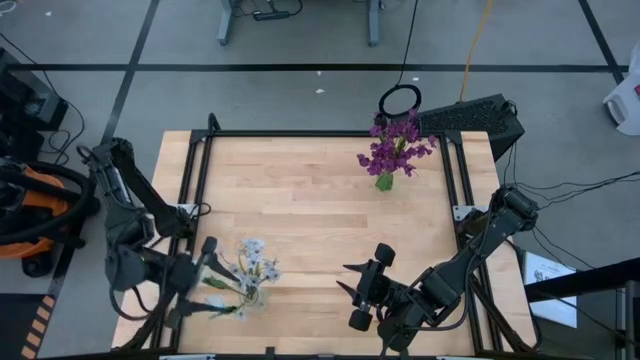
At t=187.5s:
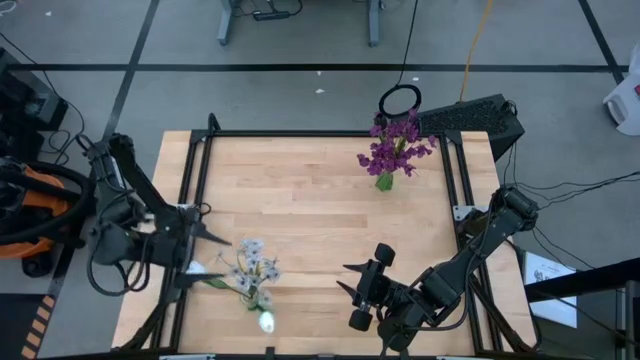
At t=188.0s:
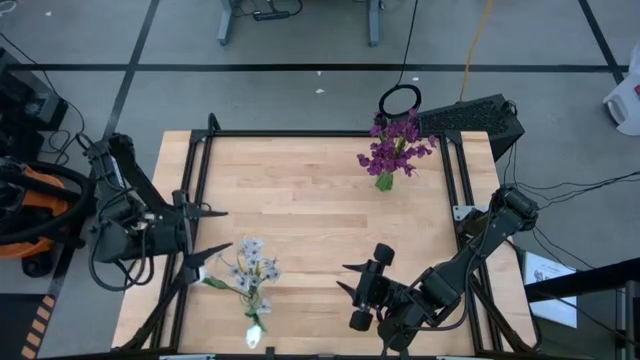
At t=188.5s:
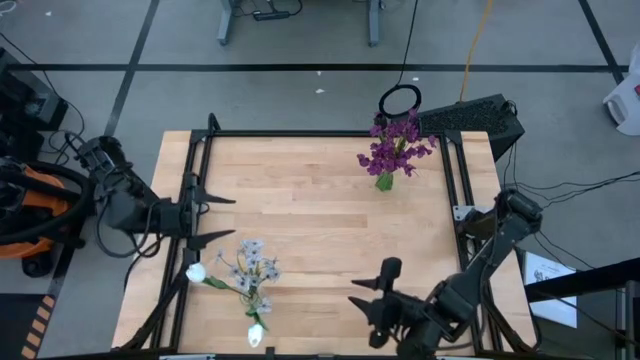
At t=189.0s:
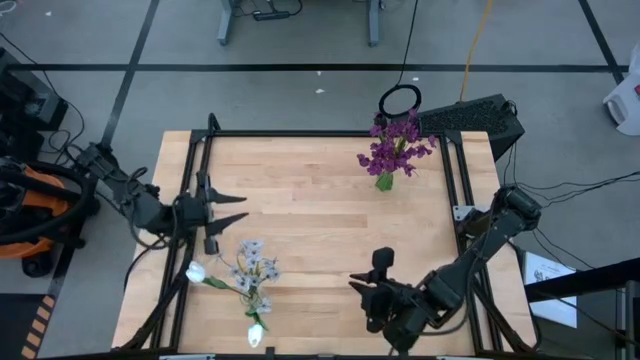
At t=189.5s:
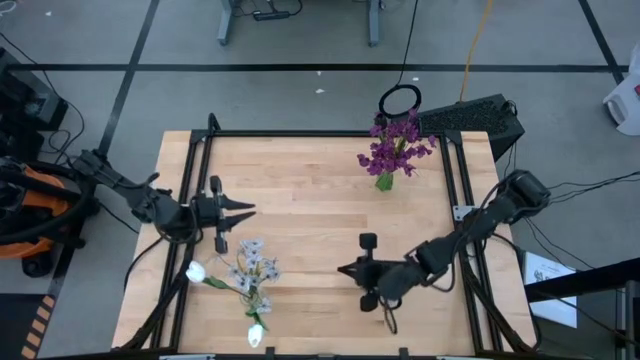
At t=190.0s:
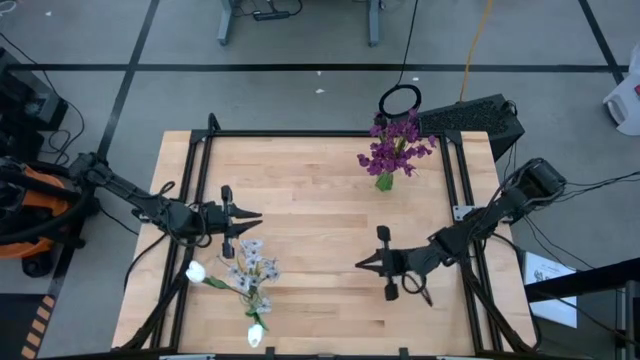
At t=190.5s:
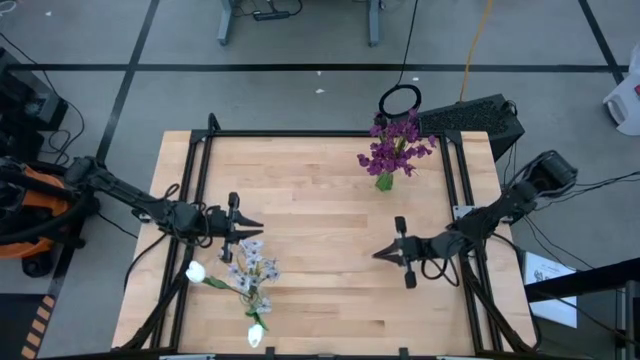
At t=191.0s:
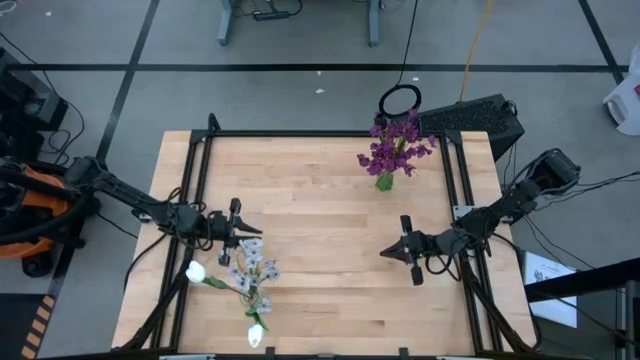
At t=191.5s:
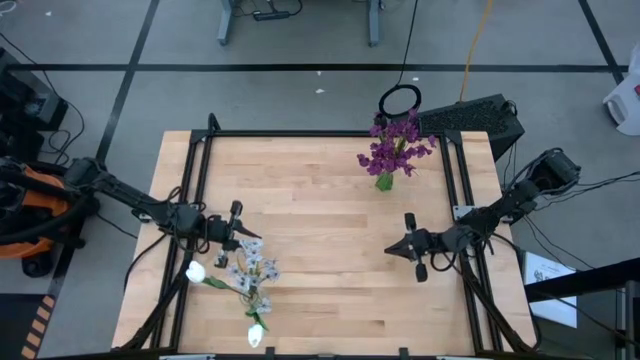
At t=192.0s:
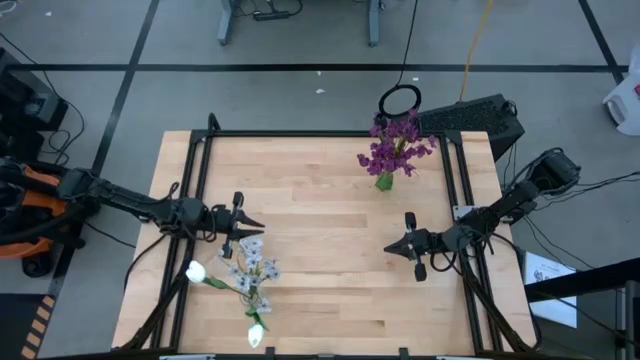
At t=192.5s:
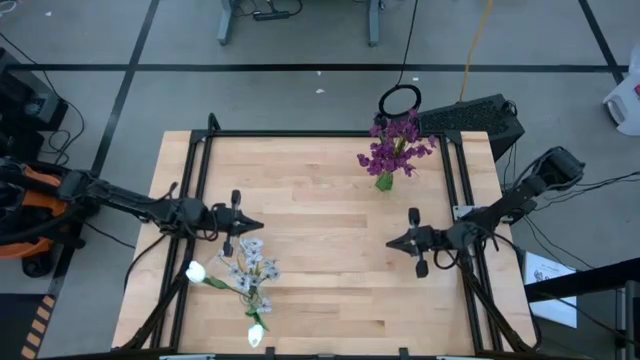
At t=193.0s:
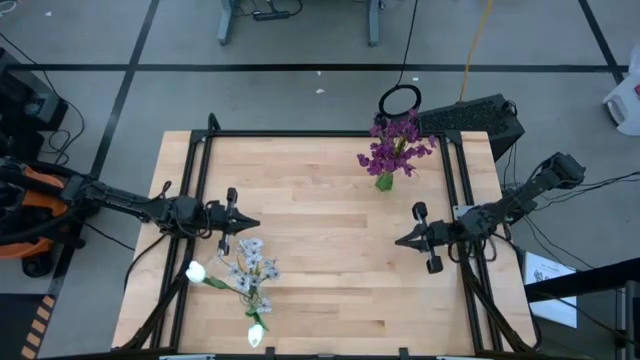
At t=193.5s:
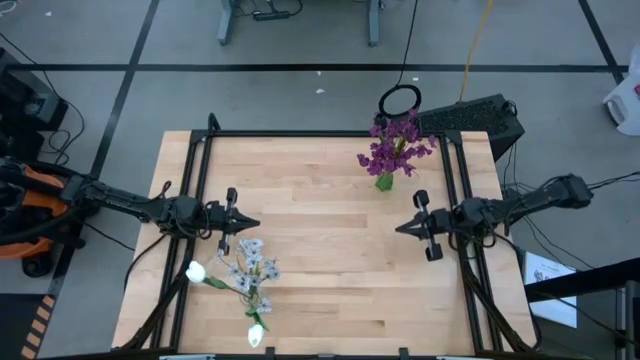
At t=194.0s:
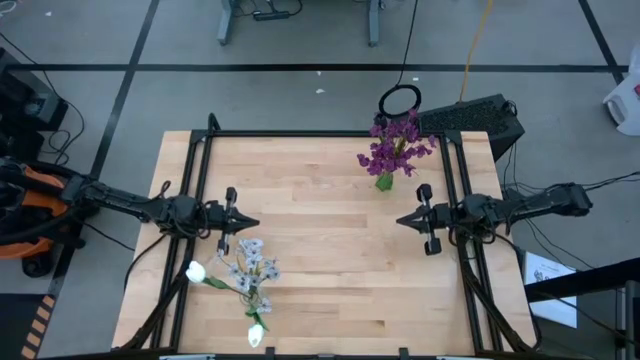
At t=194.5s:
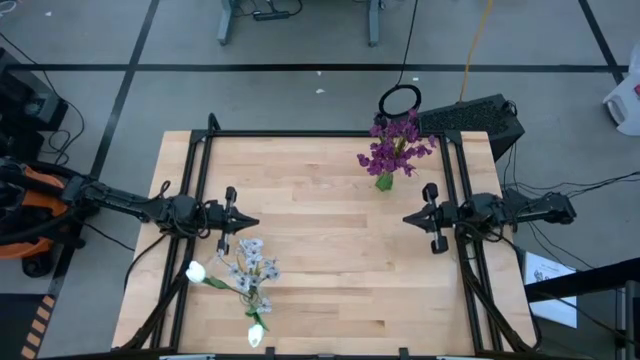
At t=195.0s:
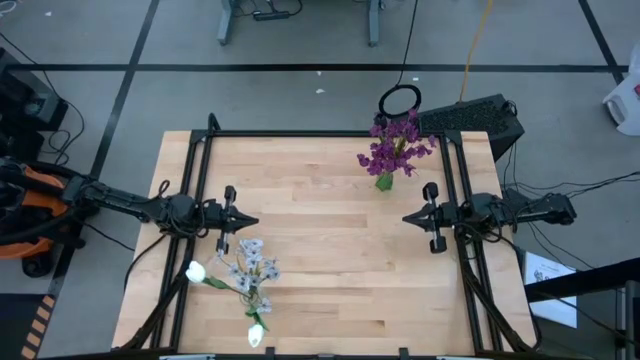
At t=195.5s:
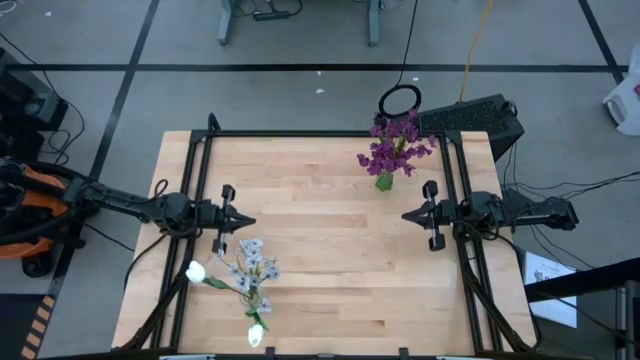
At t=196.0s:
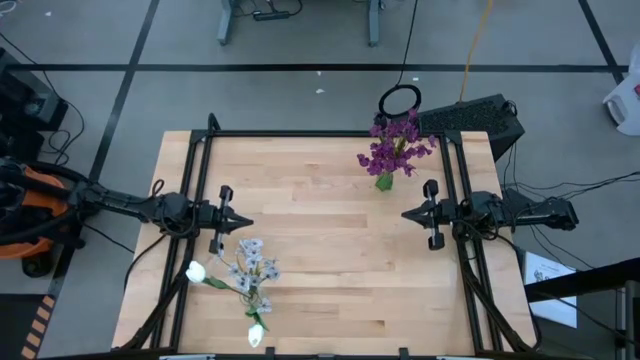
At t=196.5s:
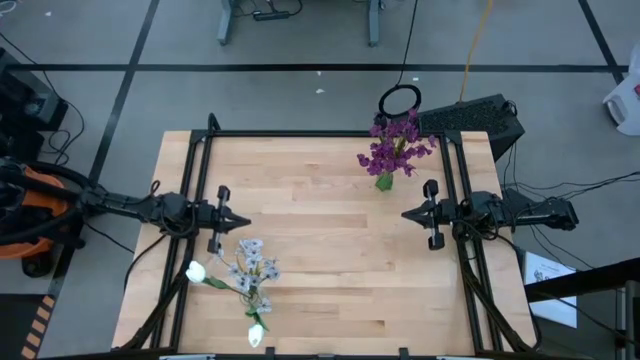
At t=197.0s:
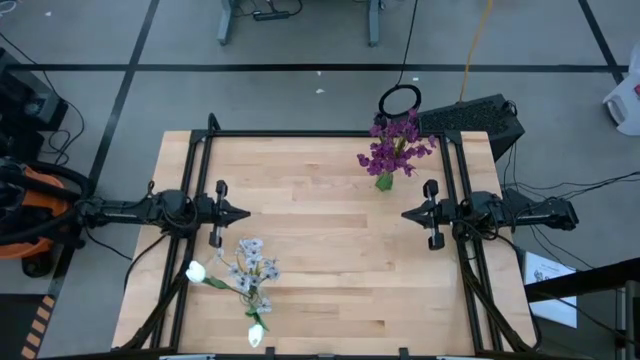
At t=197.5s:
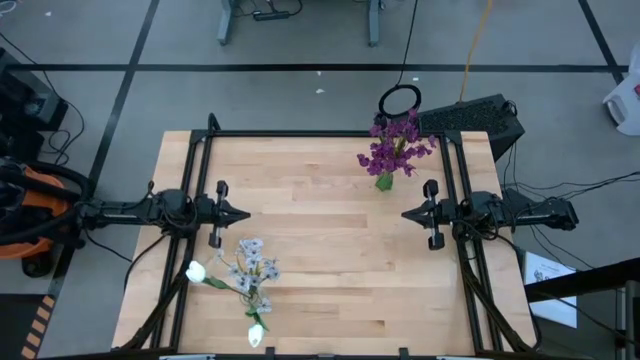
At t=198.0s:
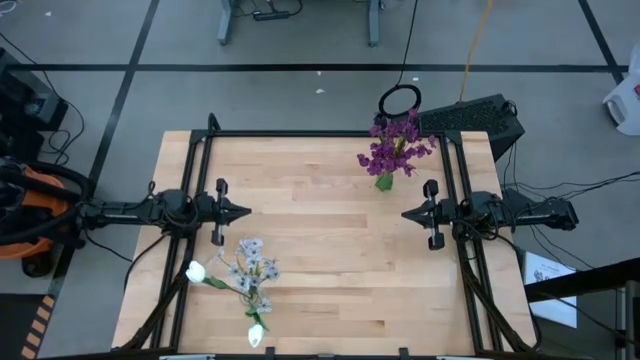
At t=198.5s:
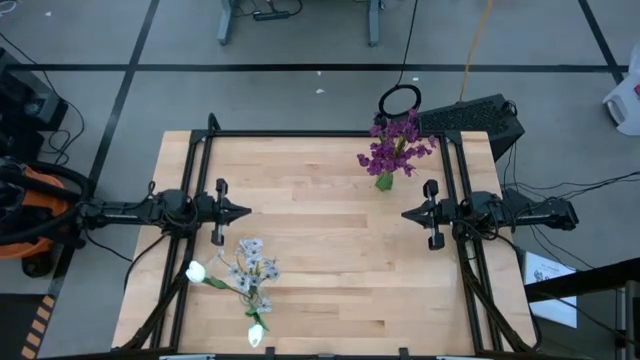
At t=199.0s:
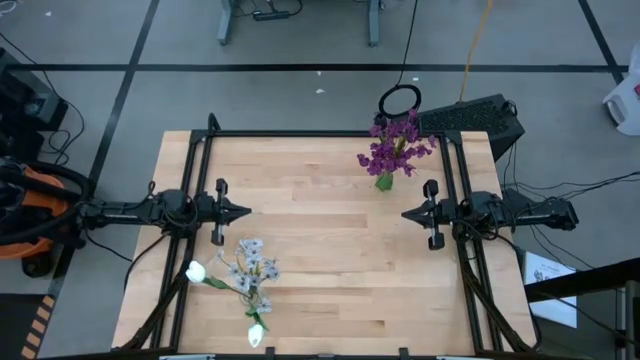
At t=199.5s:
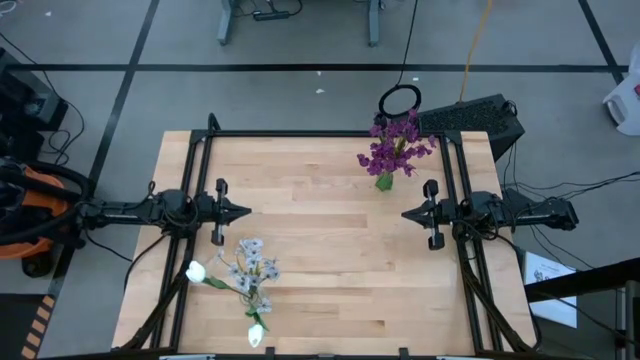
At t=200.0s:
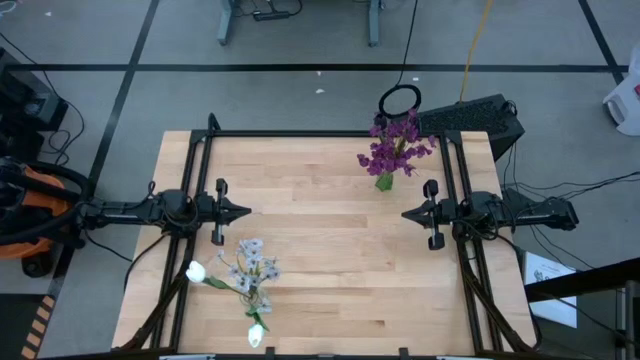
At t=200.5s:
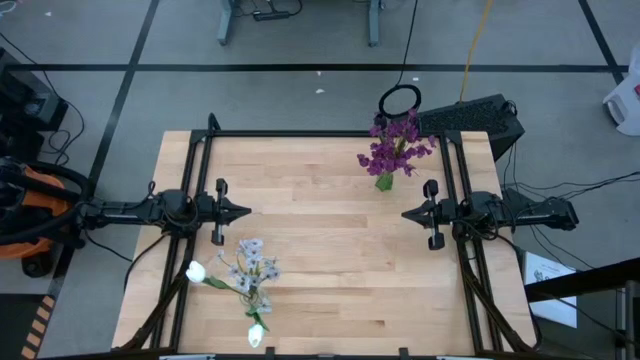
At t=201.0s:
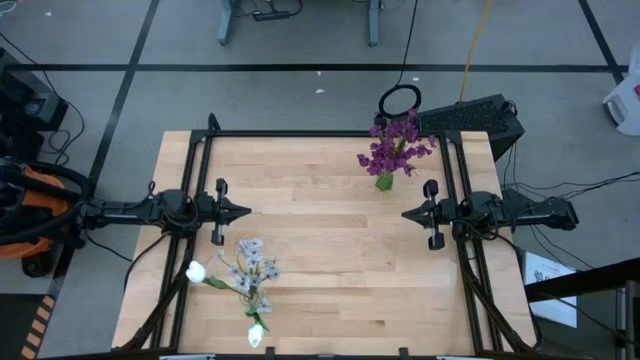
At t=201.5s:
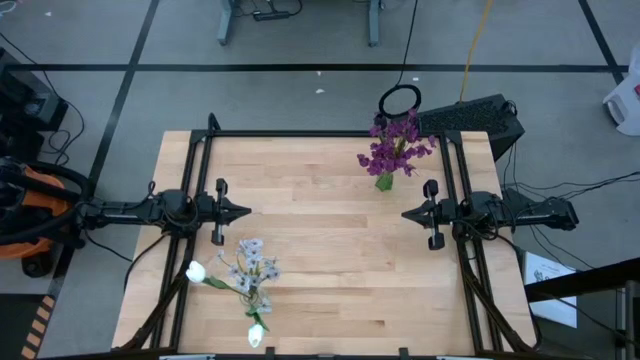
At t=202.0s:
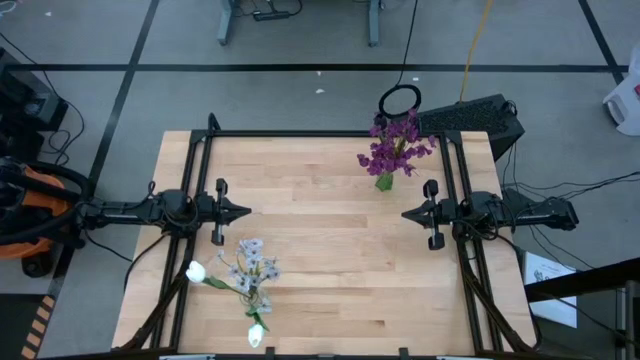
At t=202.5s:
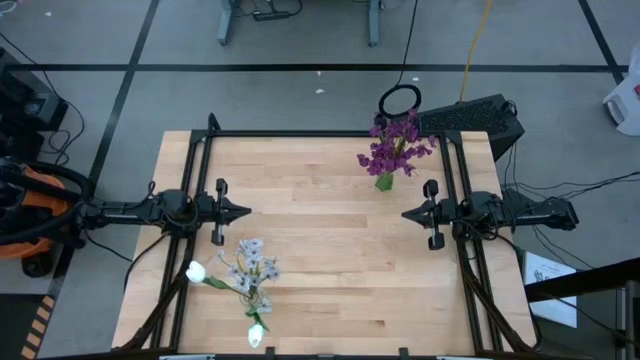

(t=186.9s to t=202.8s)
Task: Sort flowers into vase by color
Return to Home Position

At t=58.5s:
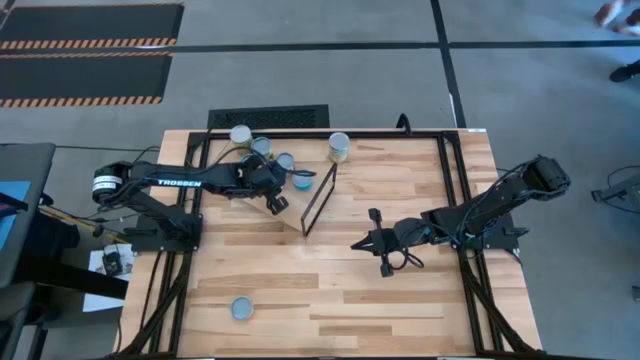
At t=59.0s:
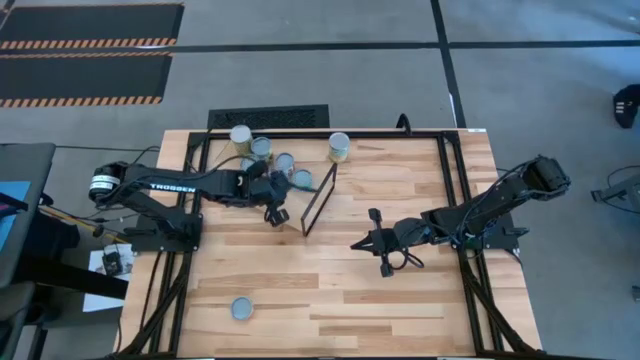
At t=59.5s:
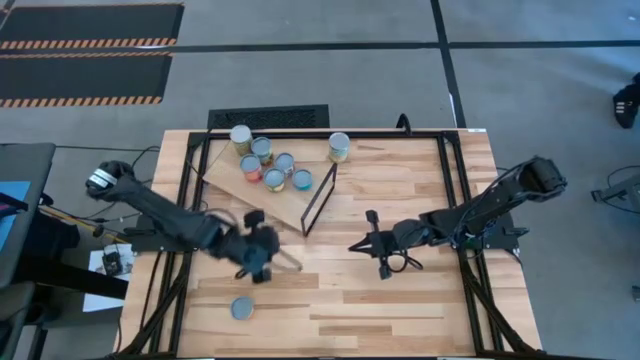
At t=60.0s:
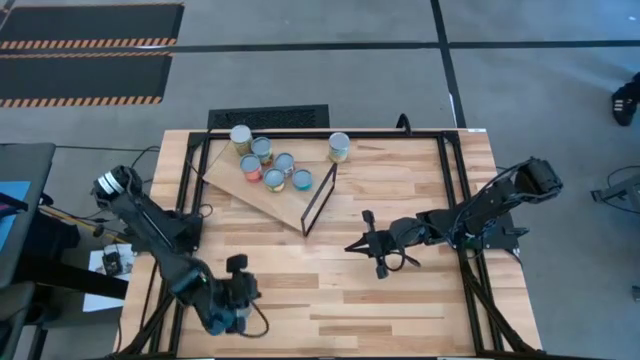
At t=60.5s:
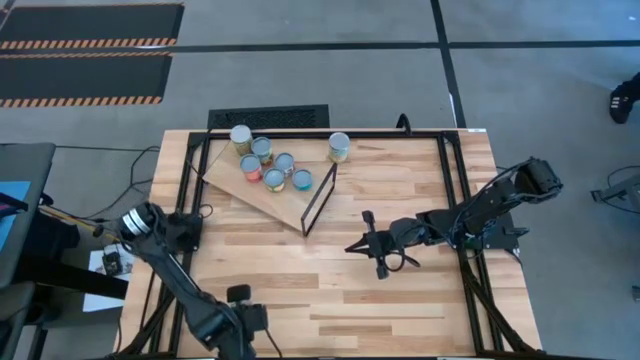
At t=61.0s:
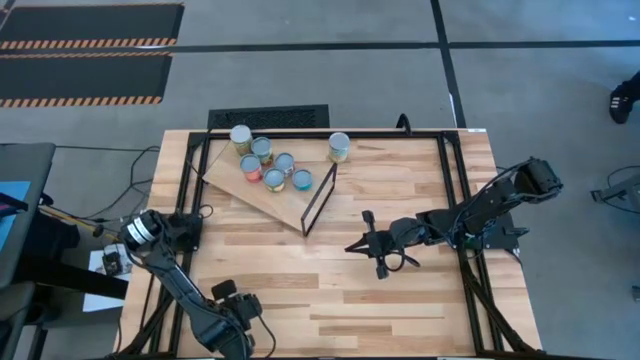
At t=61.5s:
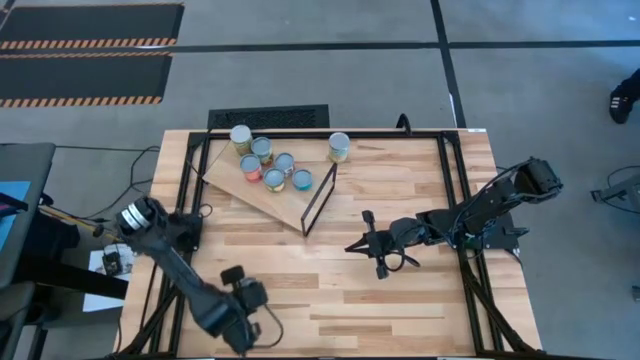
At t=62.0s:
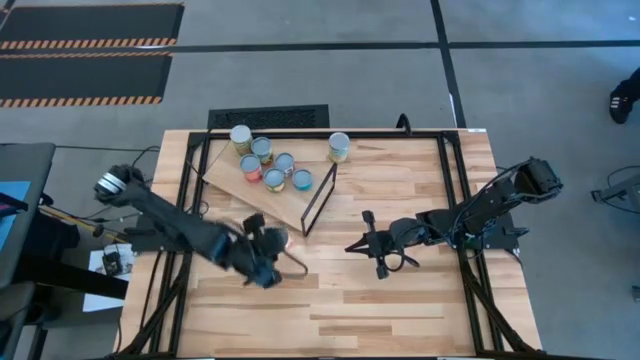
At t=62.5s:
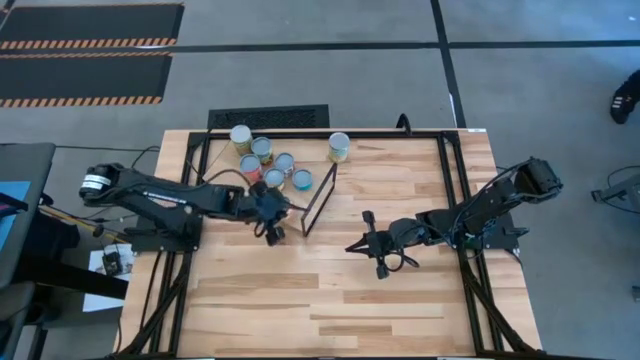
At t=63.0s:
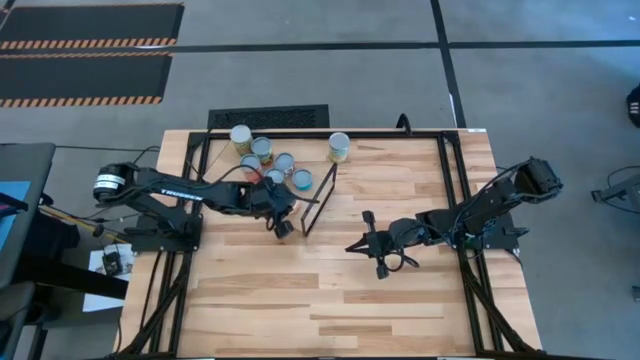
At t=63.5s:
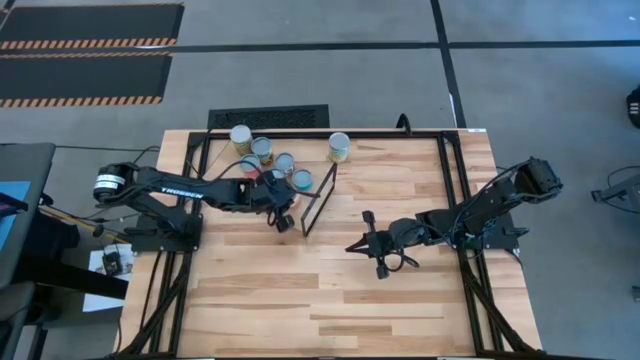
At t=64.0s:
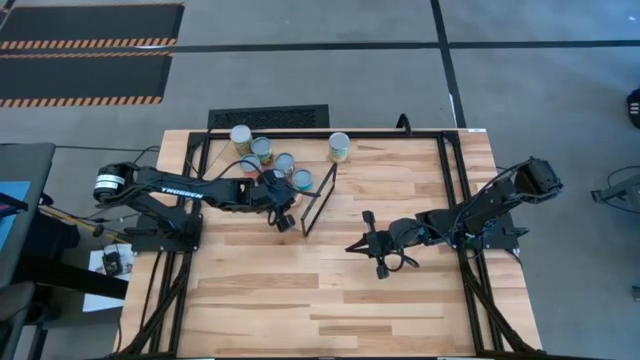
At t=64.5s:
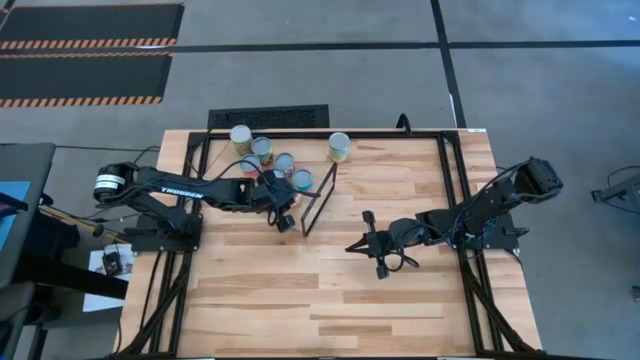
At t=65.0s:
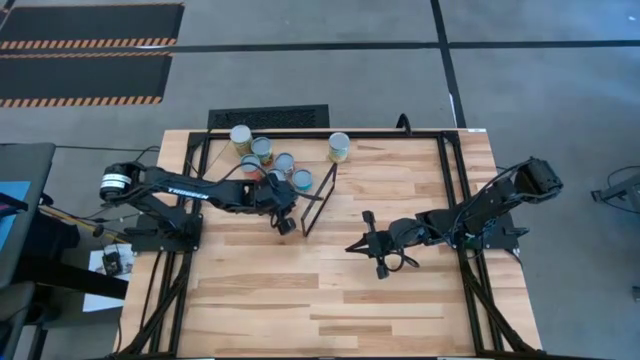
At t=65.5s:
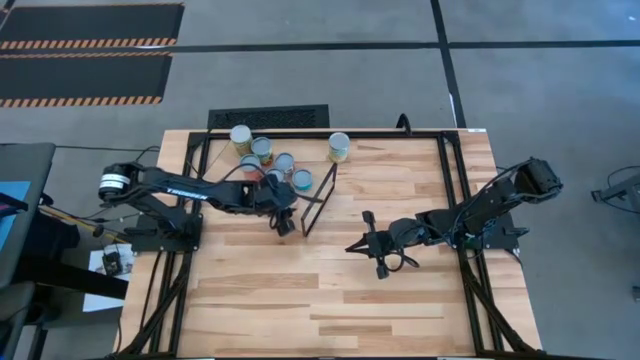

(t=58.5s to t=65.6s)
Task: Pick and place cans onto a shelf
Put the canned mushroom on the shelf
